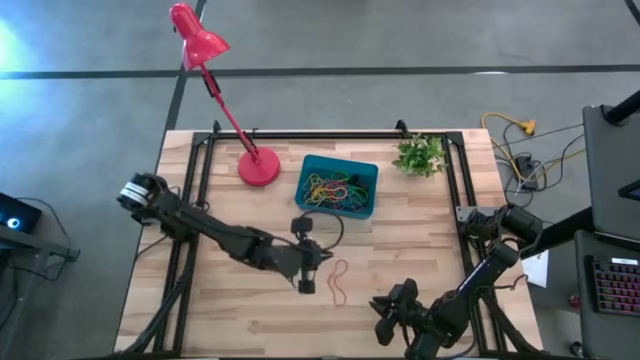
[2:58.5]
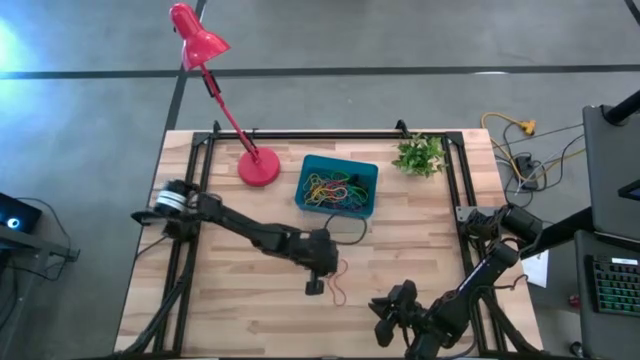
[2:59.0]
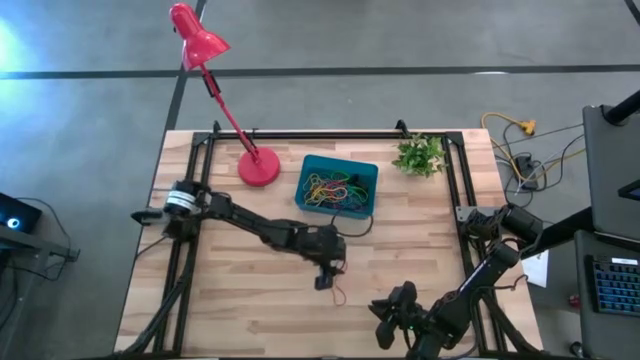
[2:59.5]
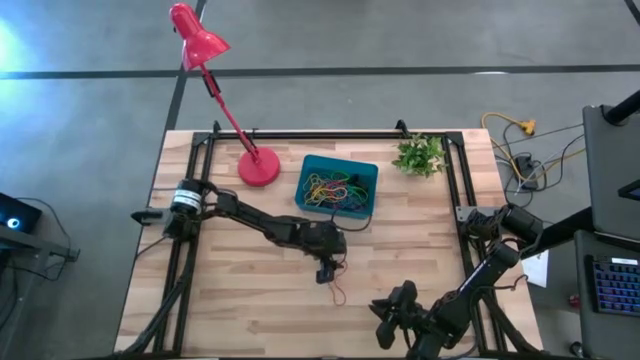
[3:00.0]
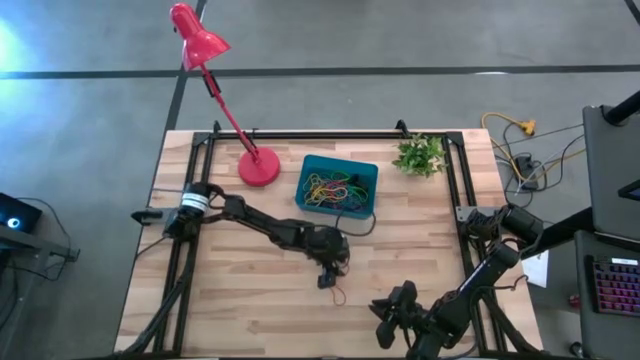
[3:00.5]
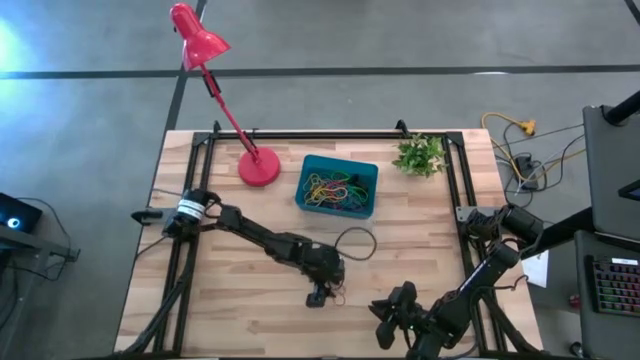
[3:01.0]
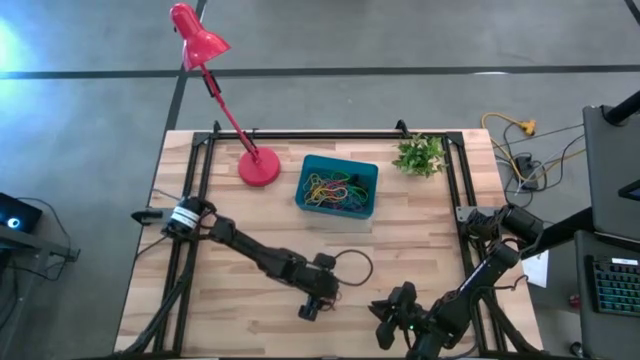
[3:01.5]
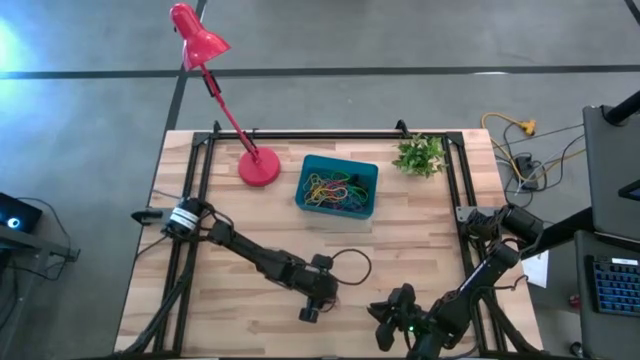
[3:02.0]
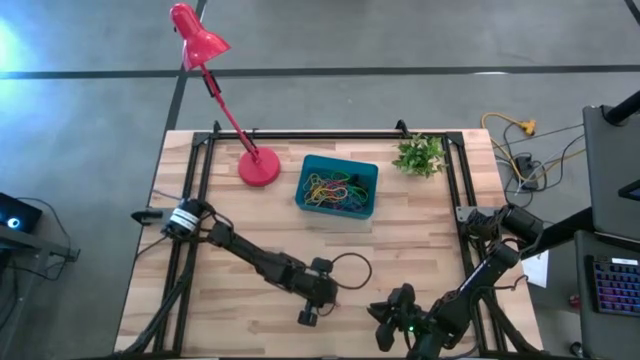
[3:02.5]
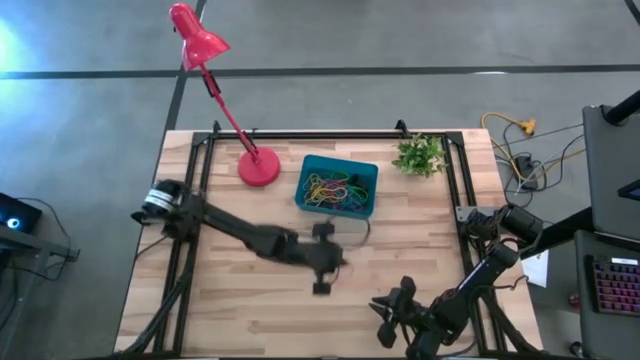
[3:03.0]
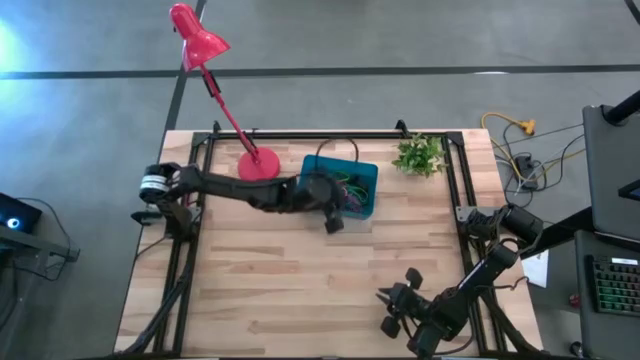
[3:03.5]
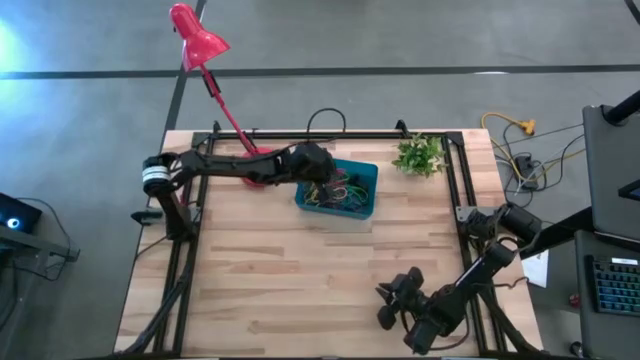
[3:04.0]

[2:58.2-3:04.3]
Task: Pick and place rubber bands into bin
Put the red rubber band into the blue bin

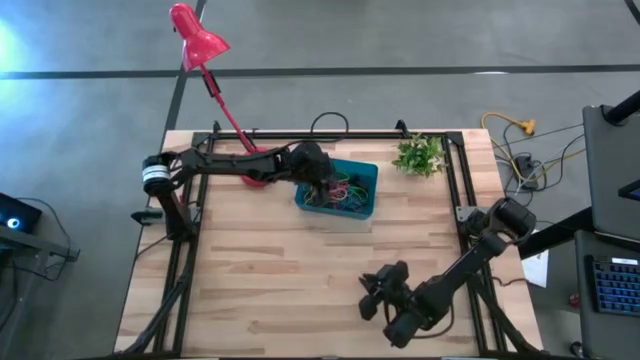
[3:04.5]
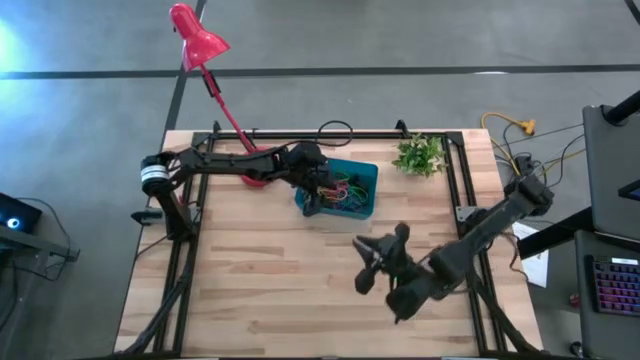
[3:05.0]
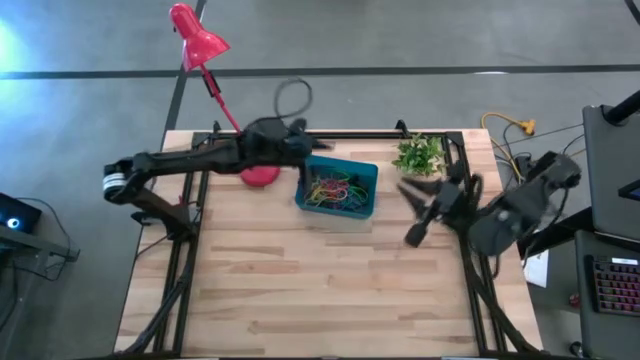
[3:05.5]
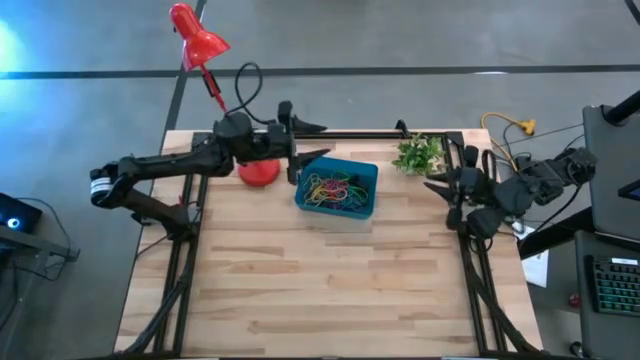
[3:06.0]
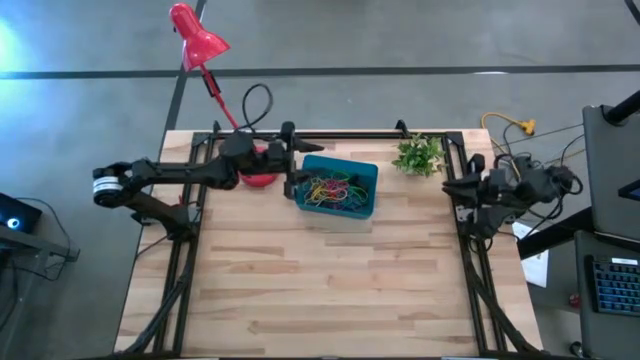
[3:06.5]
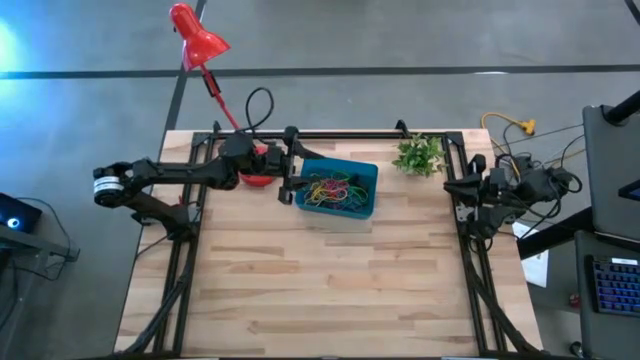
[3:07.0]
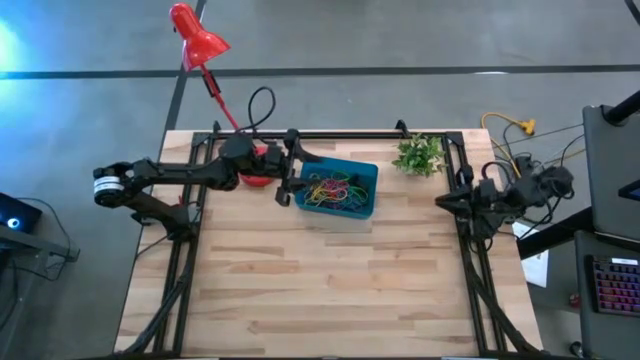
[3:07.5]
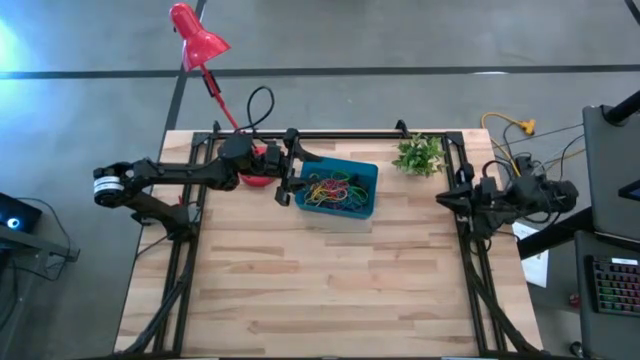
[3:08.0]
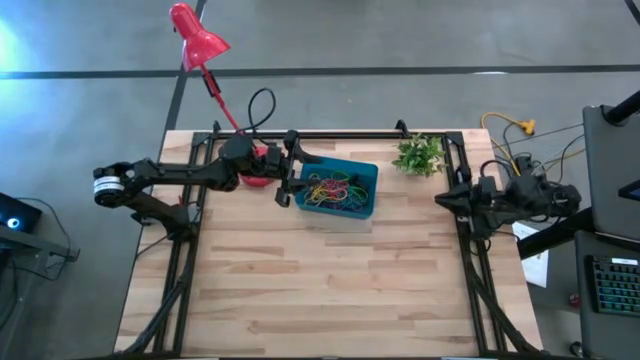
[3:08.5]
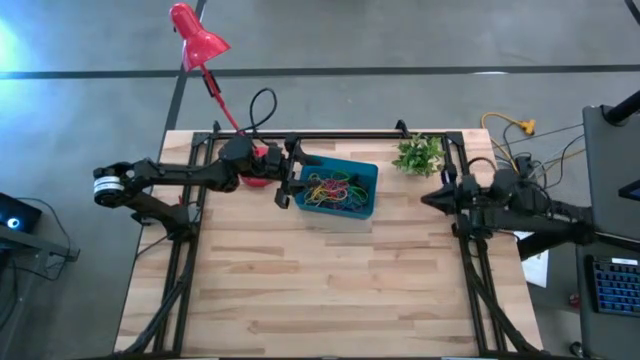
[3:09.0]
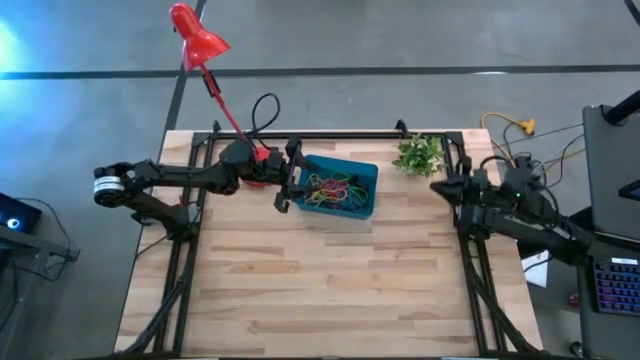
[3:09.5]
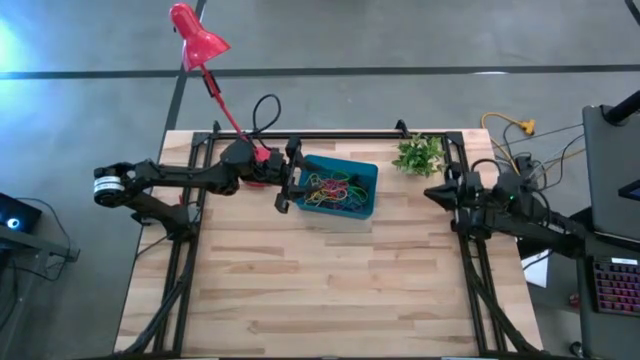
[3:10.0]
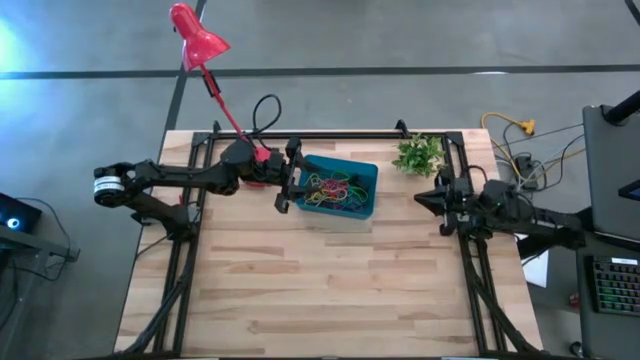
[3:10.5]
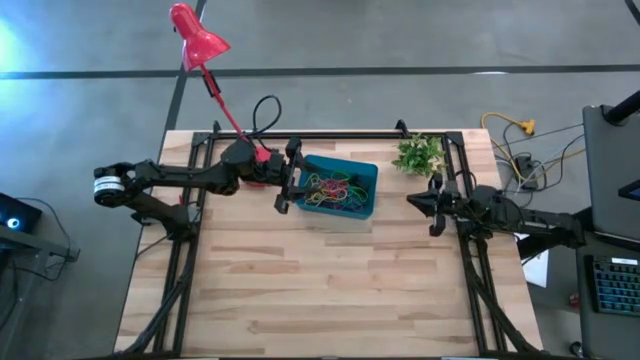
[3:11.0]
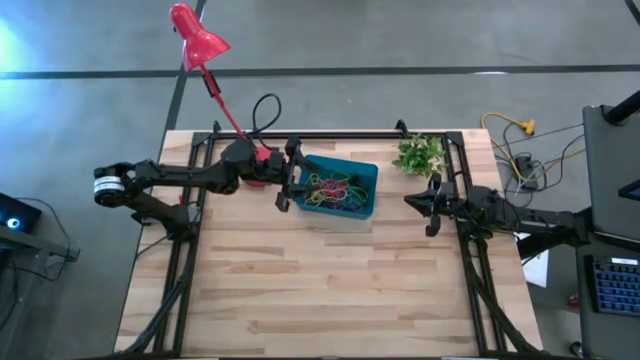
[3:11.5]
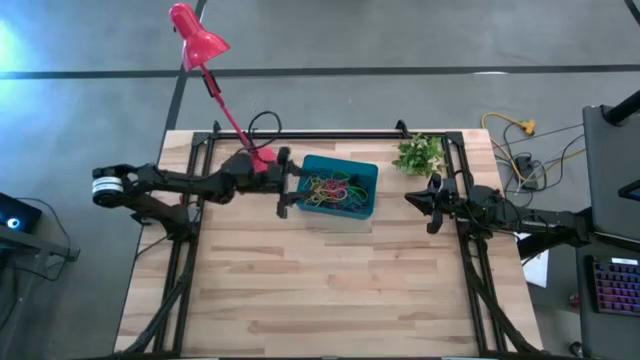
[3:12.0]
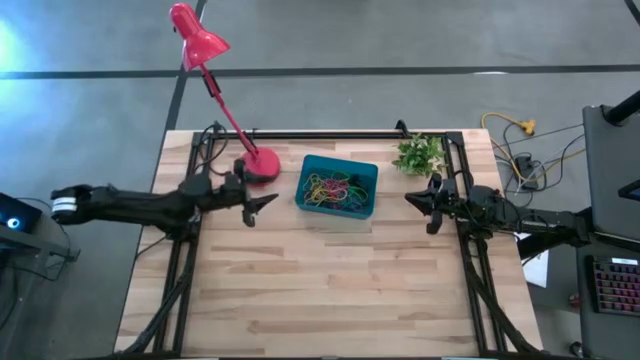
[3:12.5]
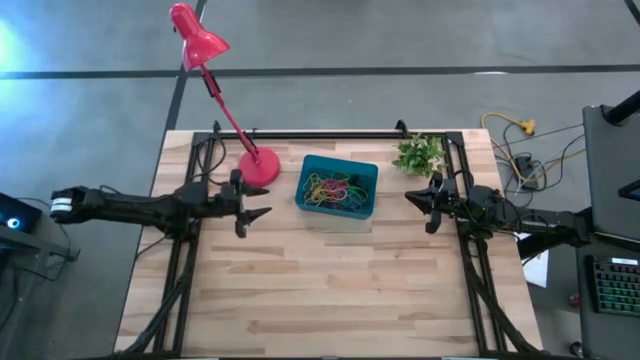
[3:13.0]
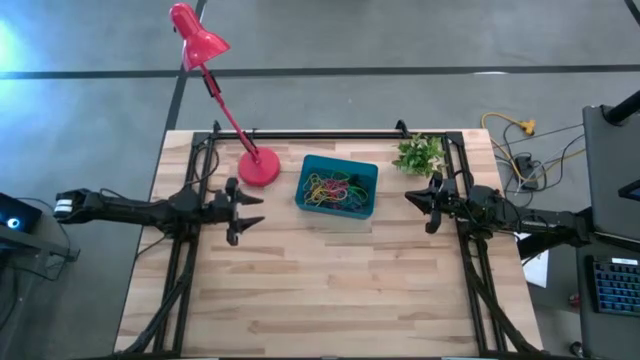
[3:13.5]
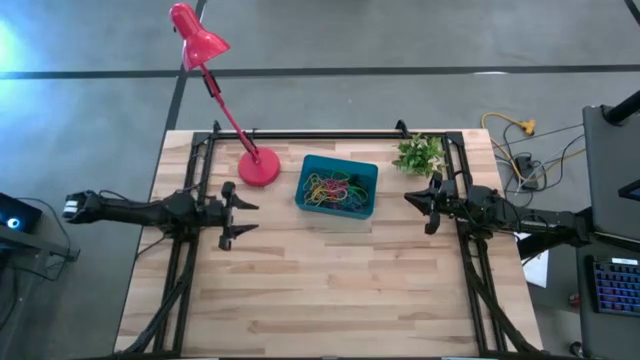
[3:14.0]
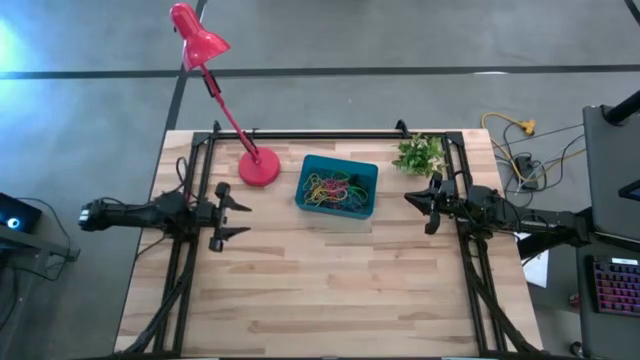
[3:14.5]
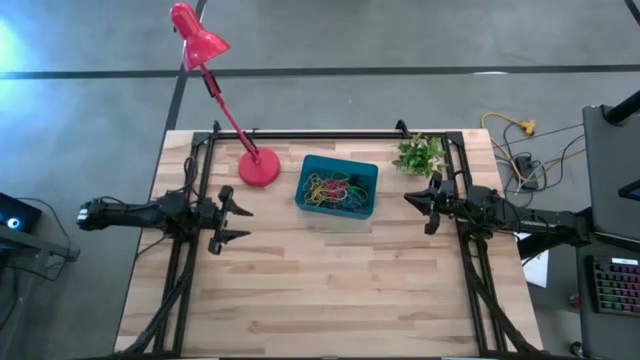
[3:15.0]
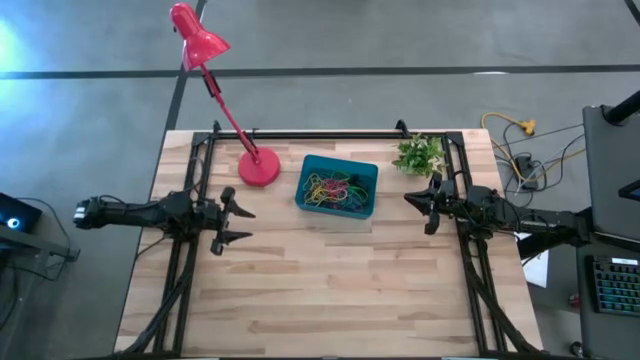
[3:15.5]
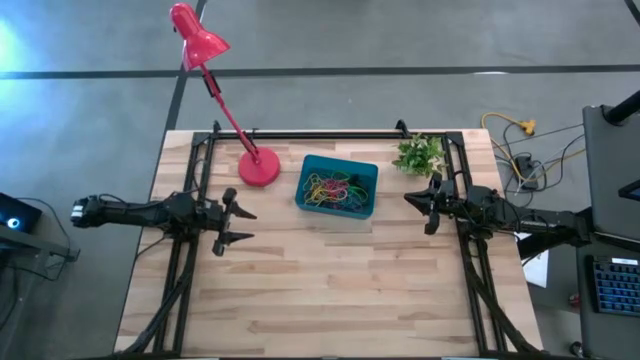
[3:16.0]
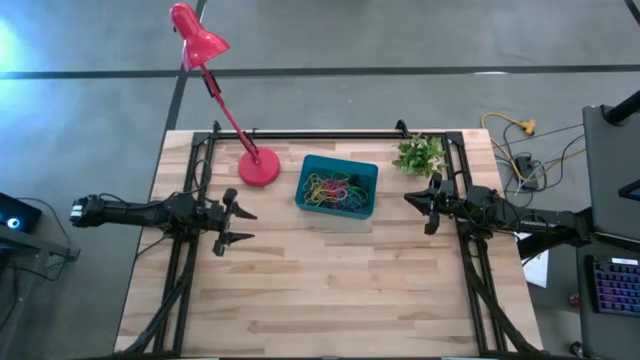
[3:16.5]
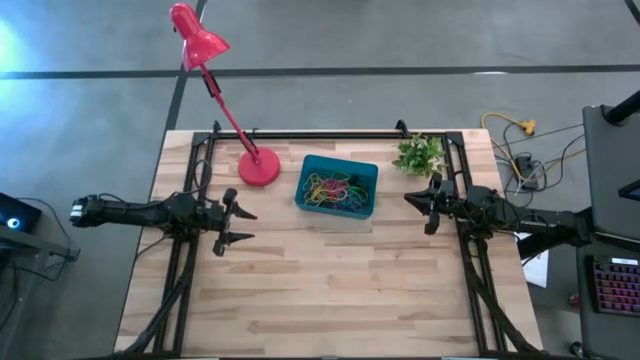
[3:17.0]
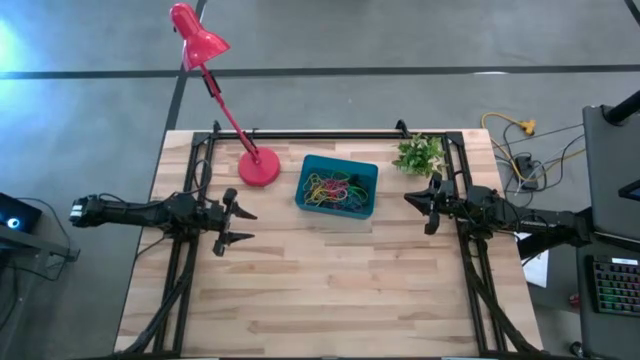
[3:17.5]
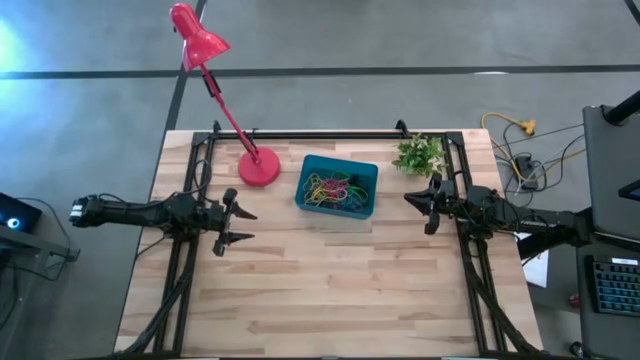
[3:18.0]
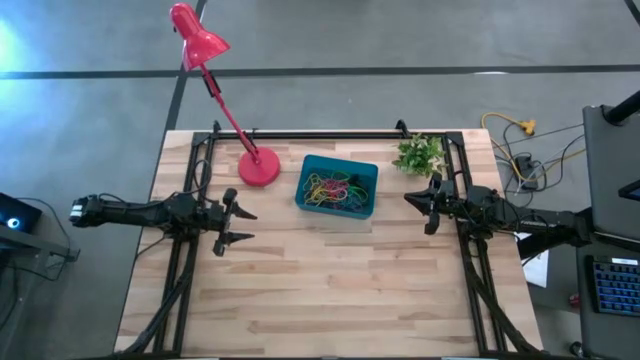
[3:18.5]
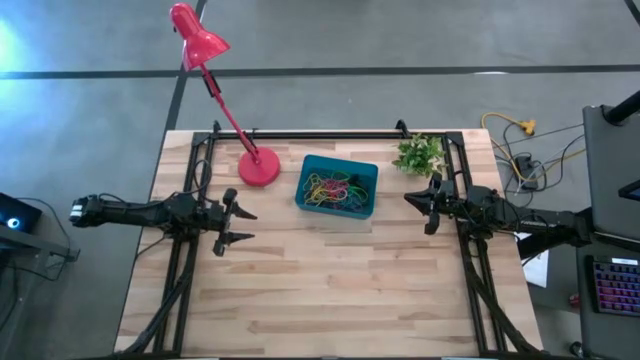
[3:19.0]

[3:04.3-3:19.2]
Return to Home Position

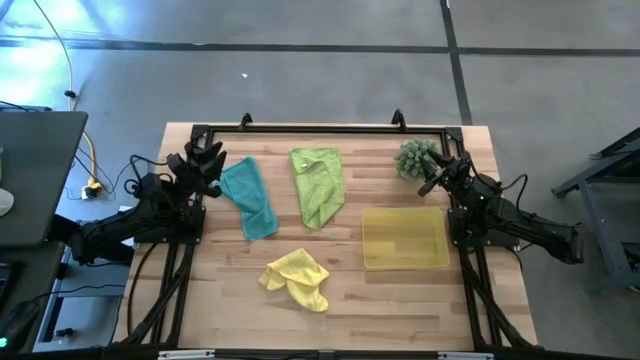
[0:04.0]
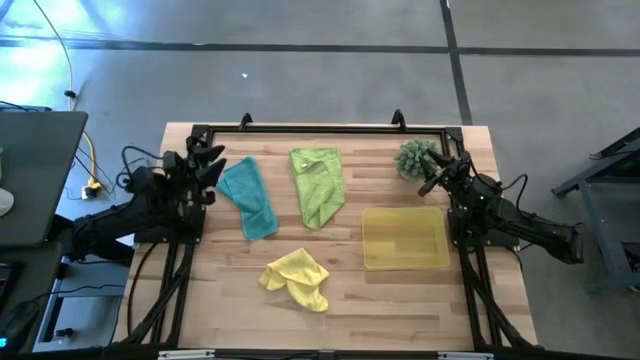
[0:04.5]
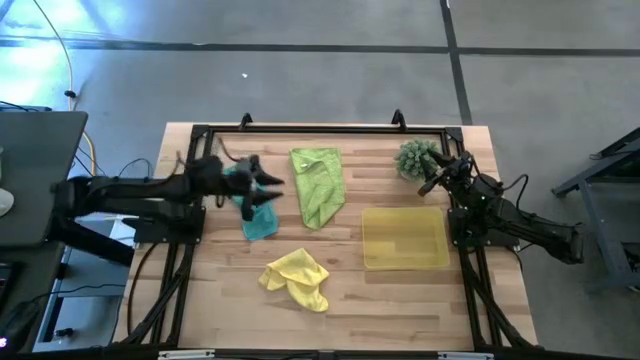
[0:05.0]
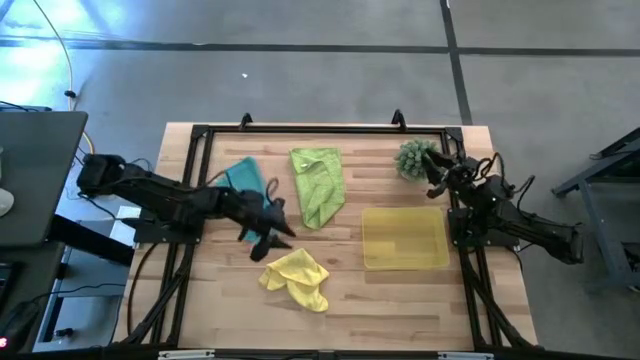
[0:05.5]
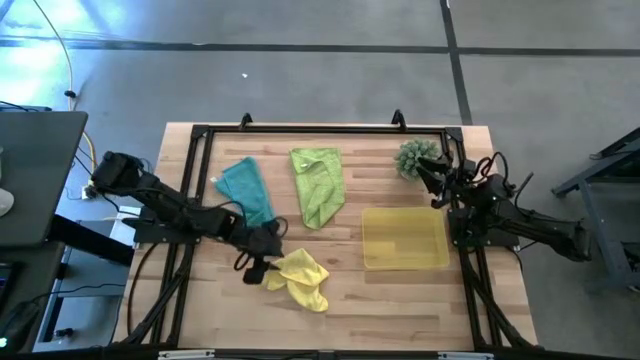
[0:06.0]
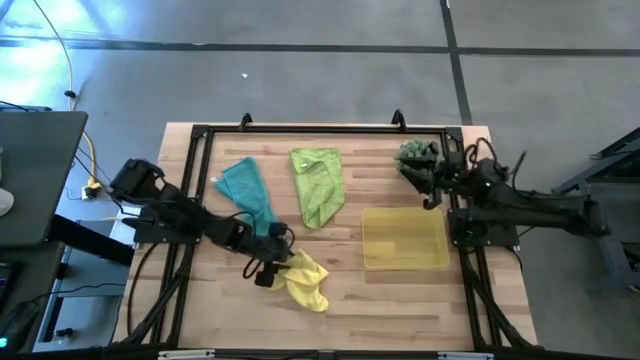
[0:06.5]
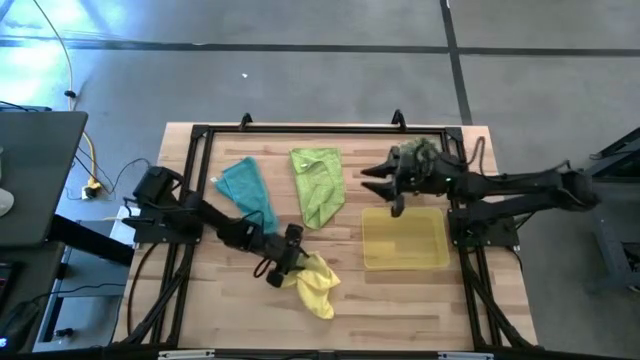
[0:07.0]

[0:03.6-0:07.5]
Task: Roll microfiber towels into tight, uniform cylinder then place into a basket
Prepare the yellow microfiber towel
